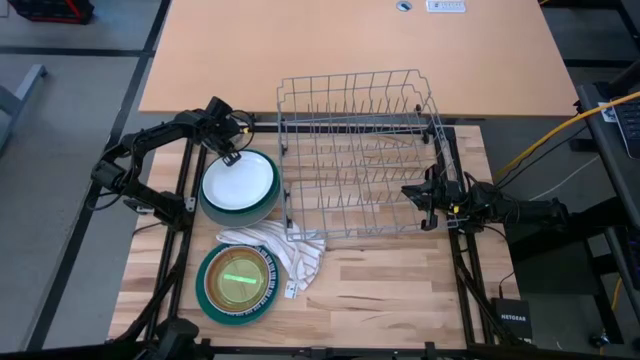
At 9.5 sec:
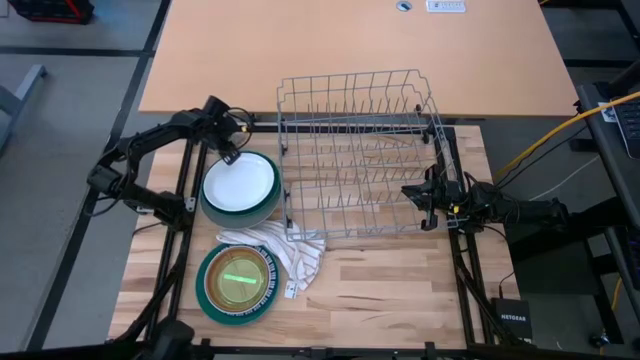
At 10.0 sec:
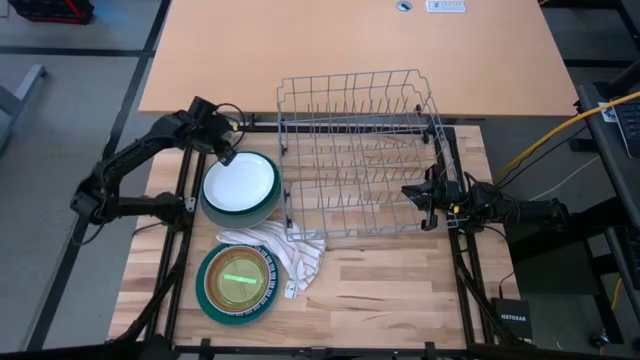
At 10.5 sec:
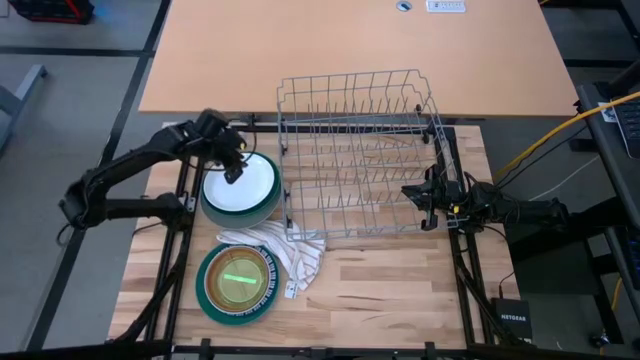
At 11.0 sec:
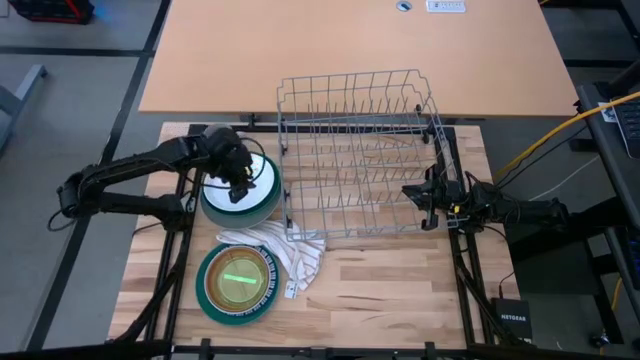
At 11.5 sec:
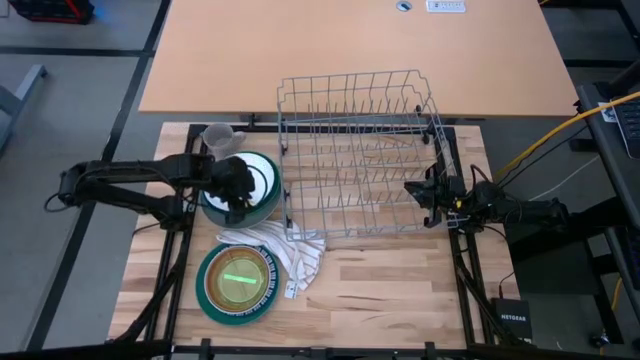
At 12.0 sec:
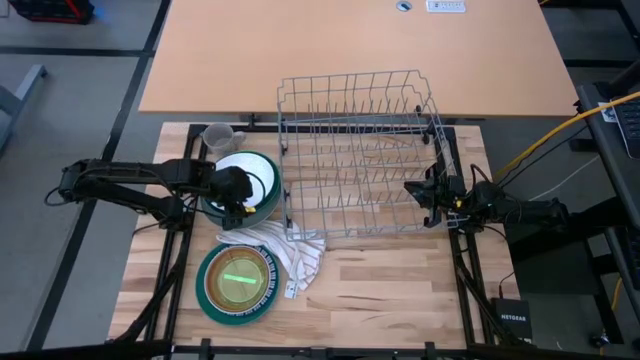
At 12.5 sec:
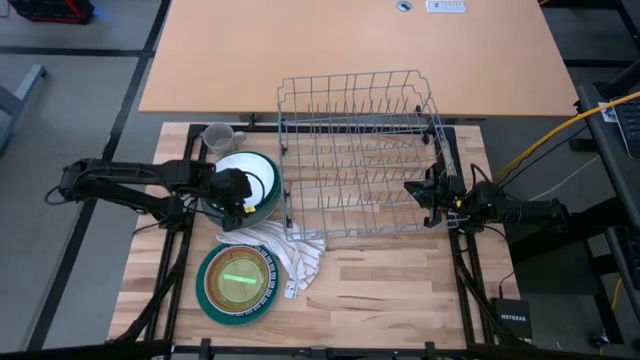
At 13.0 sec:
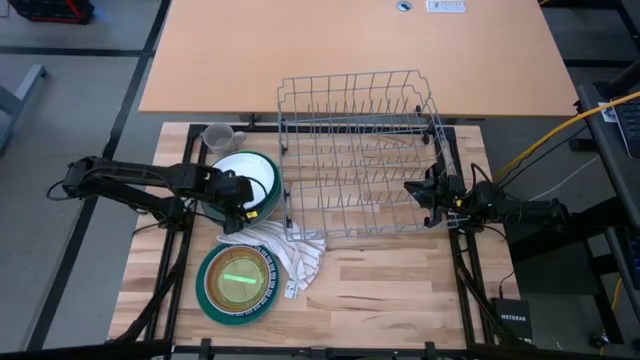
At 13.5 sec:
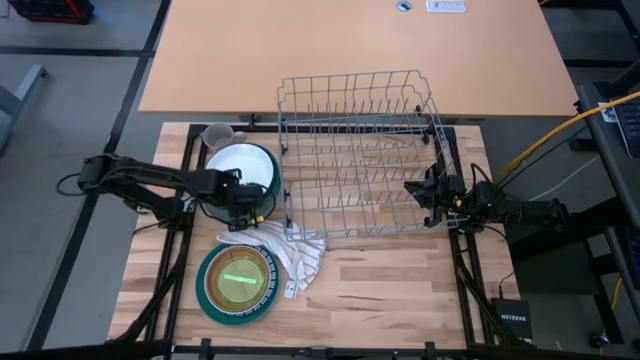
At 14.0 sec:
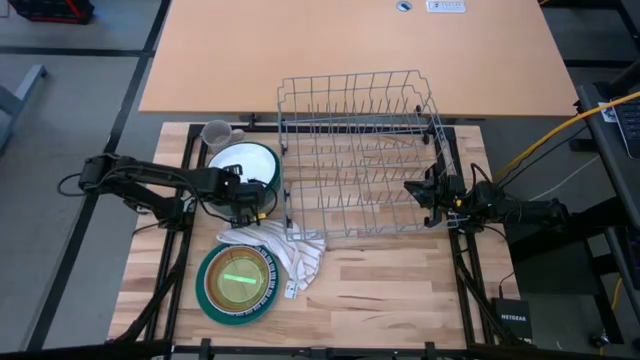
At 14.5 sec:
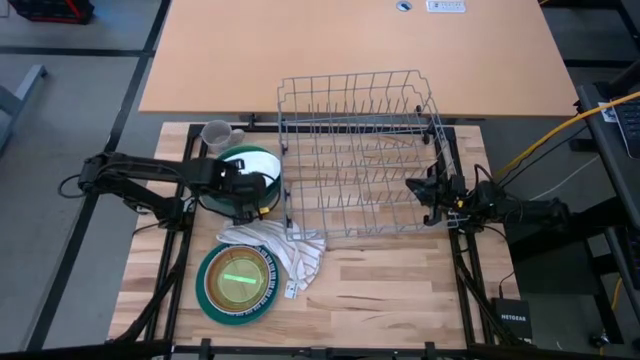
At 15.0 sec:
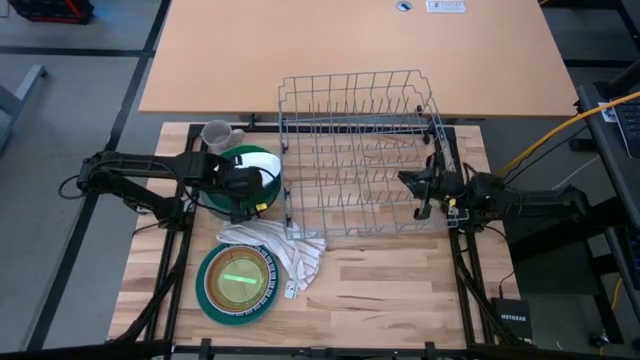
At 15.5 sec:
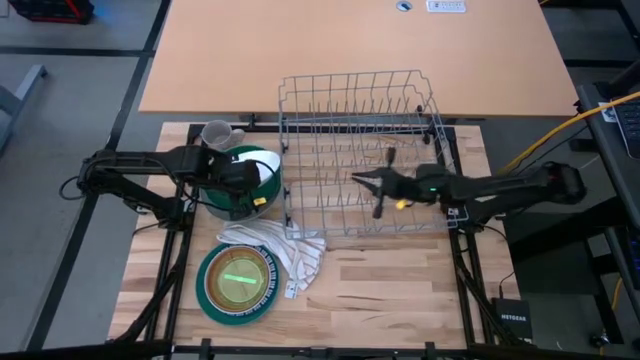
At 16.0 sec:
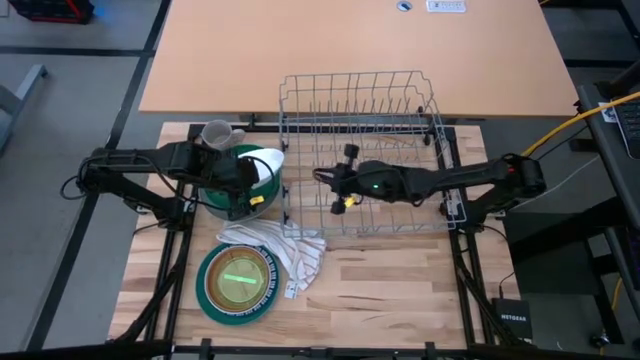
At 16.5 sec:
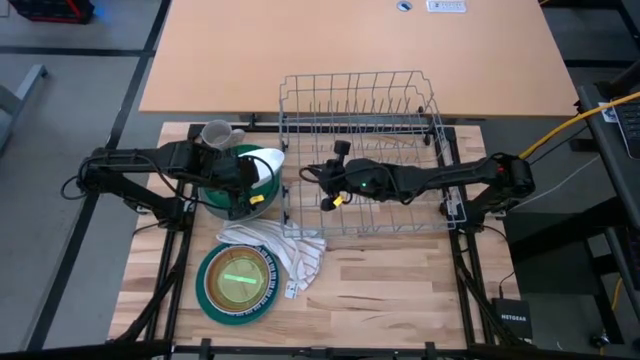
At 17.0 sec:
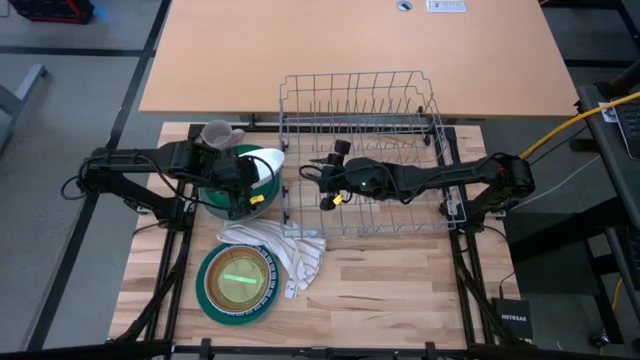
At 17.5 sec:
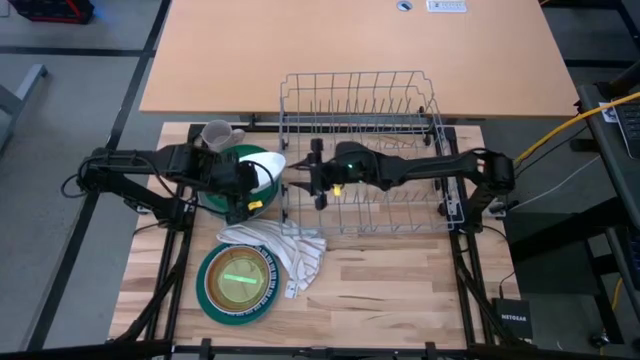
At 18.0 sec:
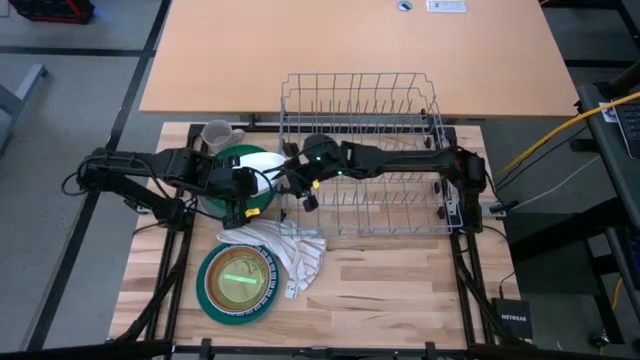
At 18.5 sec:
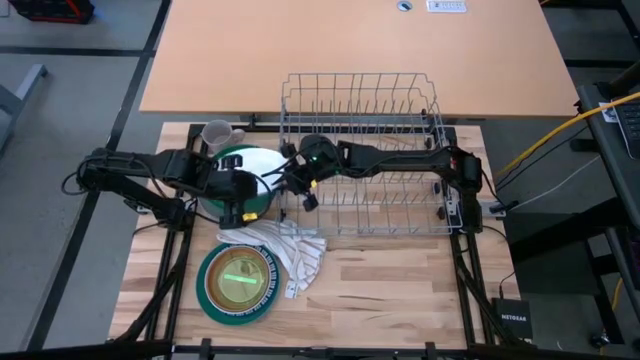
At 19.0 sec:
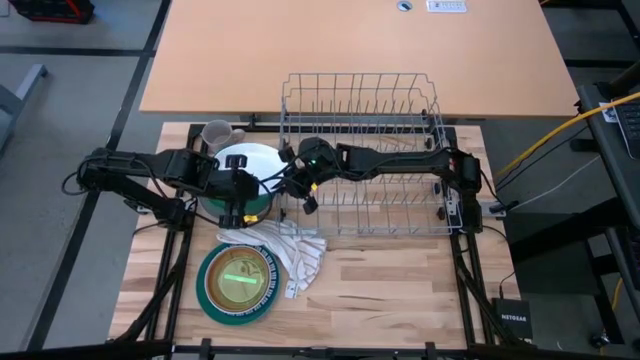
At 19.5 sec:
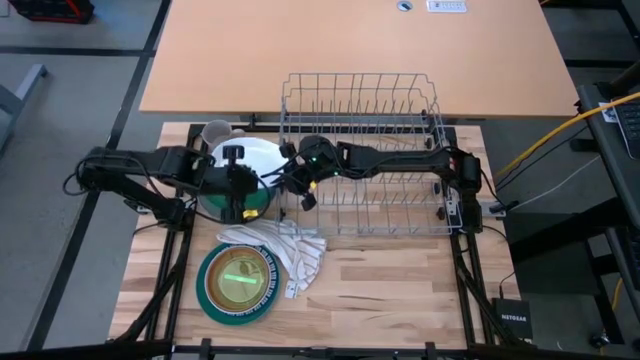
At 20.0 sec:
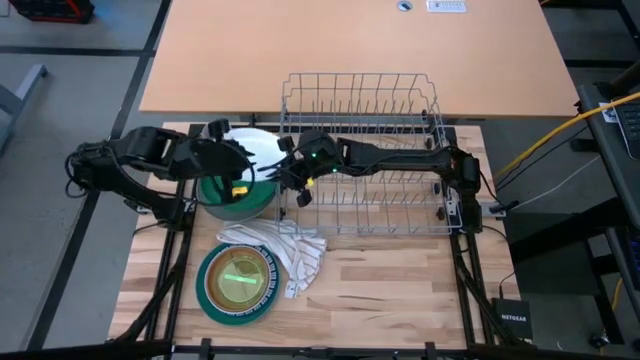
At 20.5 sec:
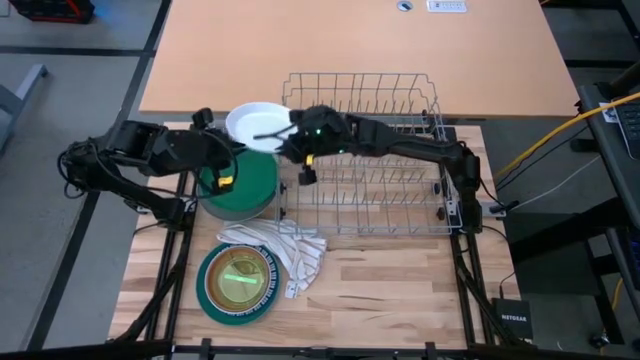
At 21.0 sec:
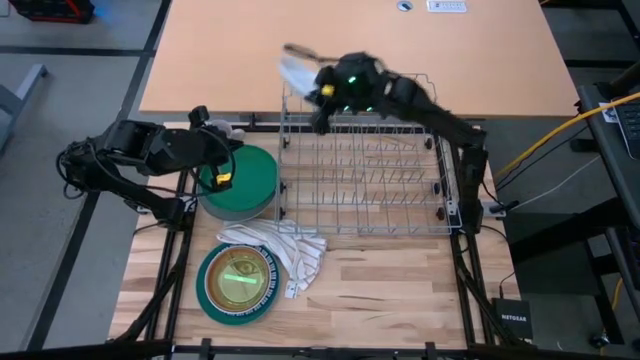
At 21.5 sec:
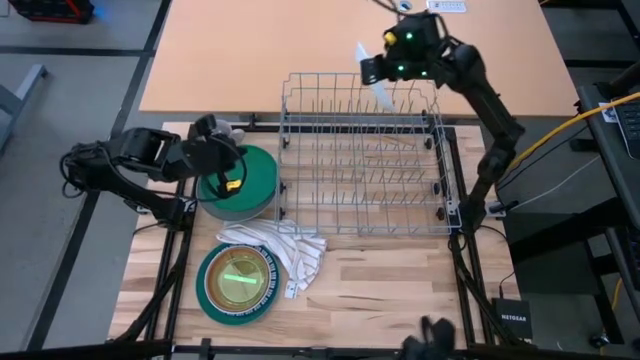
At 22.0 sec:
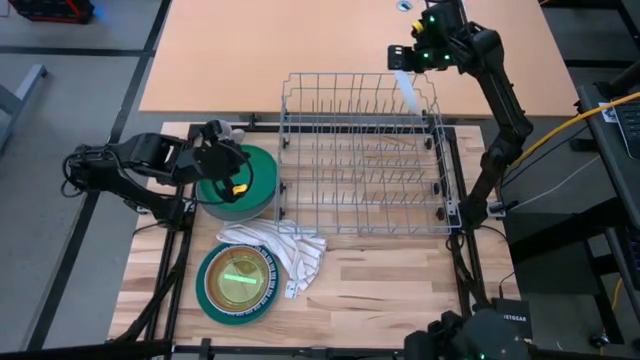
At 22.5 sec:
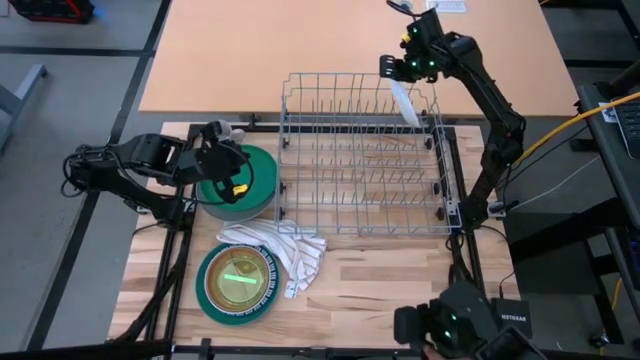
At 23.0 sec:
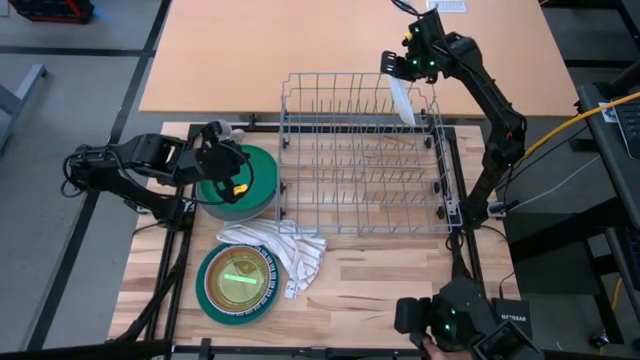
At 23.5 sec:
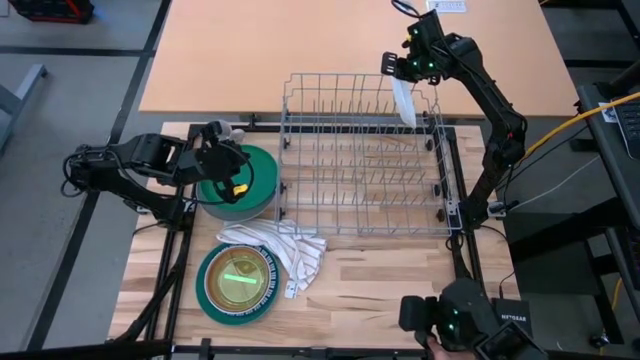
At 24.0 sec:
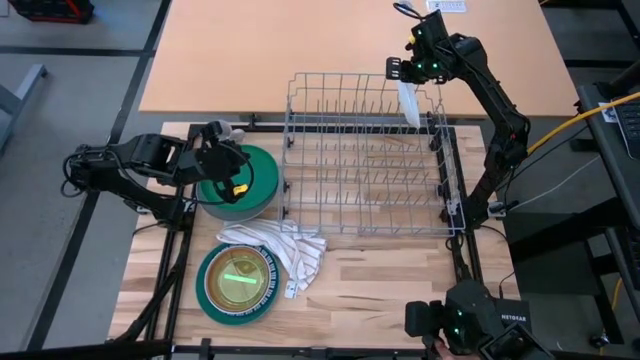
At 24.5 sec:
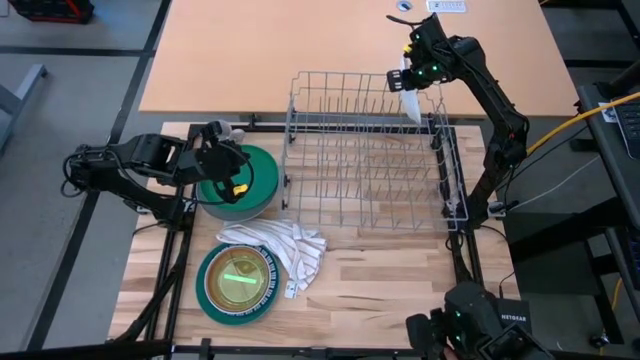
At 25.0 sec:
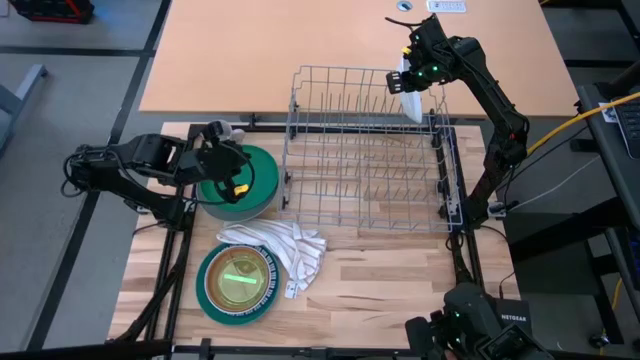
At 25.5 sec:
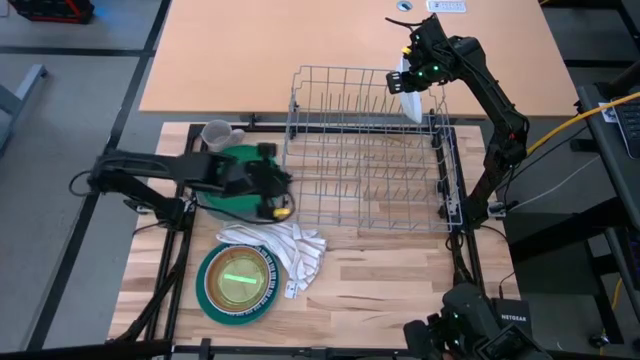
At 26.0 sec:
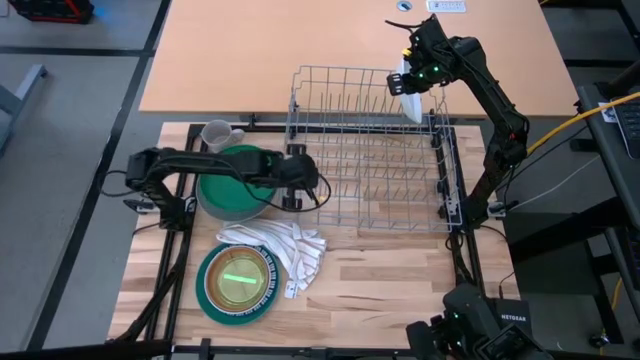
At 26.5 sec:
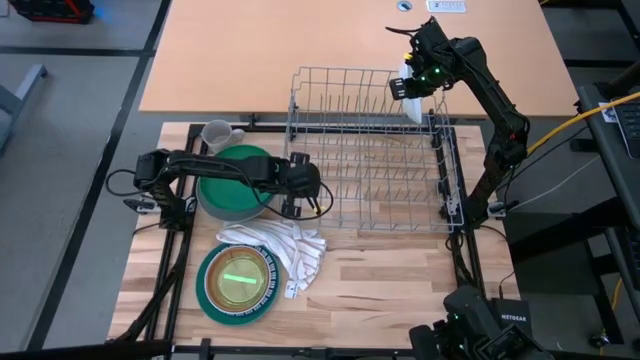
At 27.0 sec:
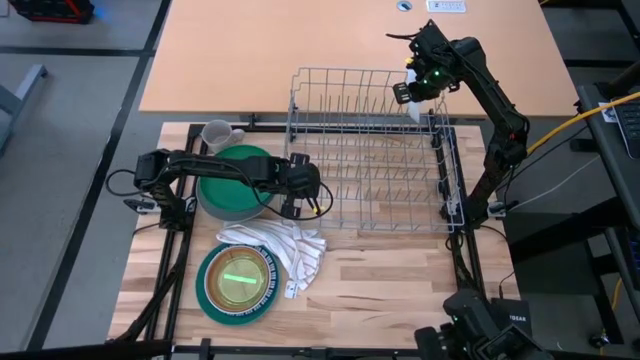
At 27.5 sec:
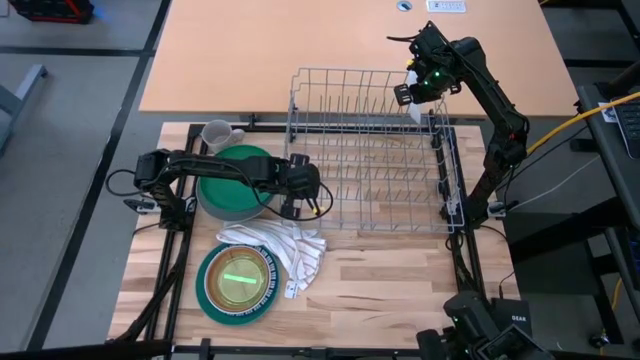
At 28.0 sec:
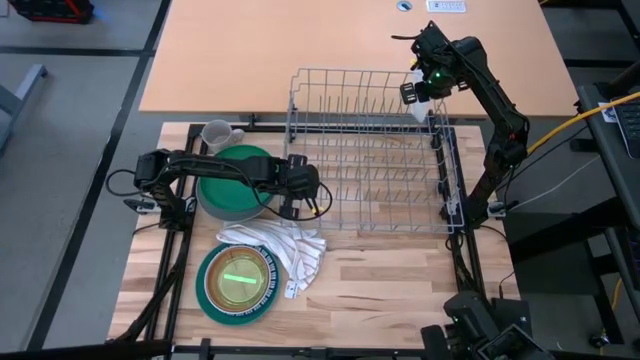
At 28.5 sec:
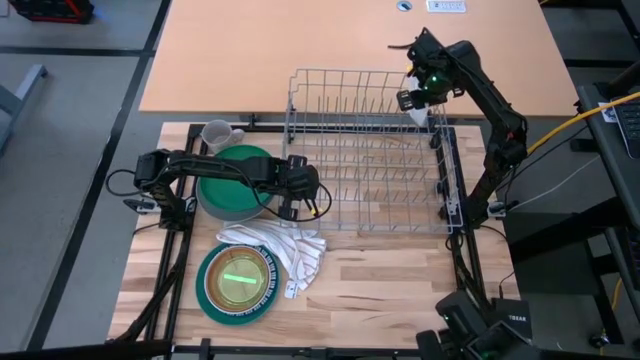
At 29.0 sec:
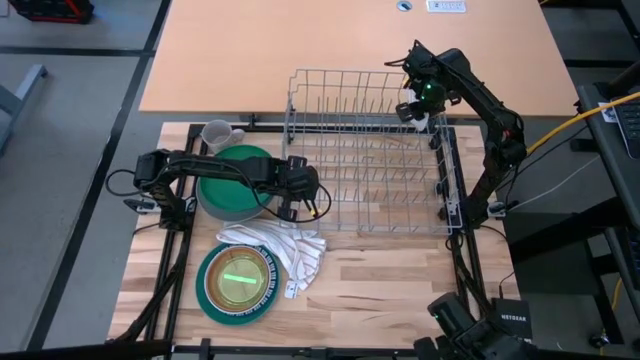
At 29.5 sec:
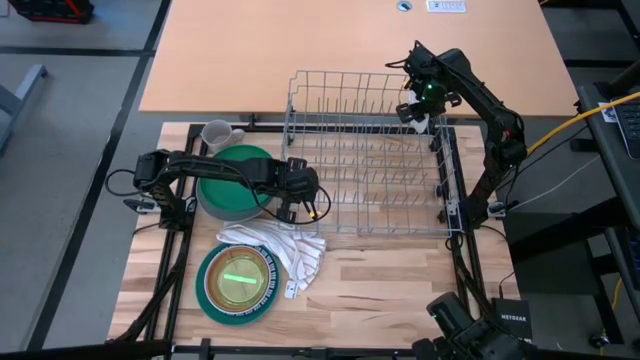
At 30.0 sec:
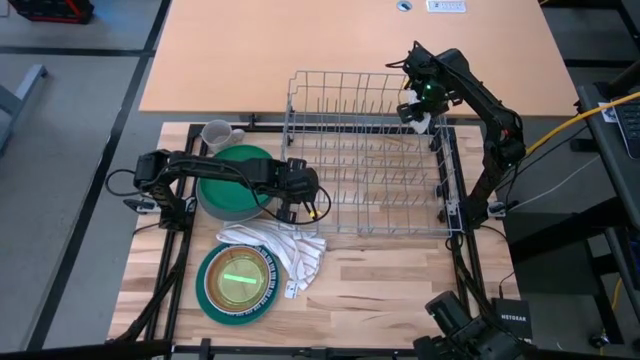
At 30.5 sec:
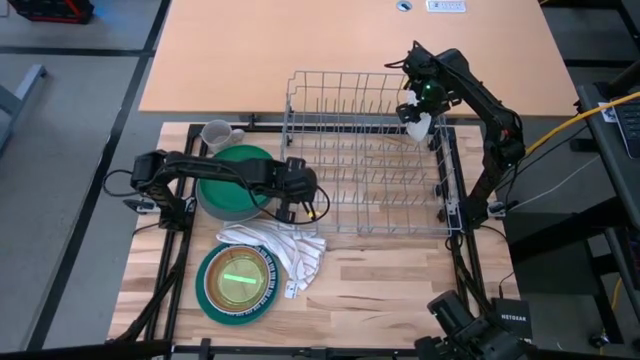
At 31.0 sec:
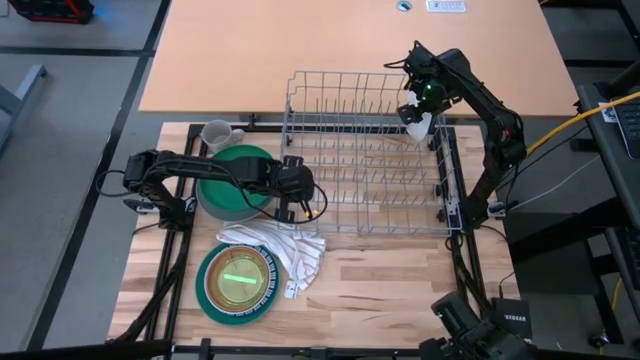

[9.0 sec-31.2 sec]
Task: Sort dishes
Put the white plate into the dish rack
